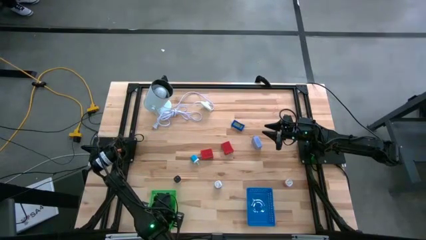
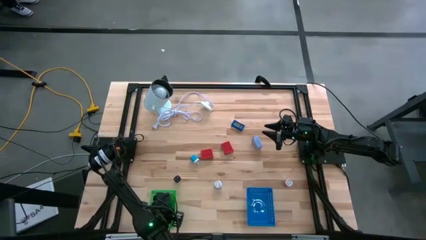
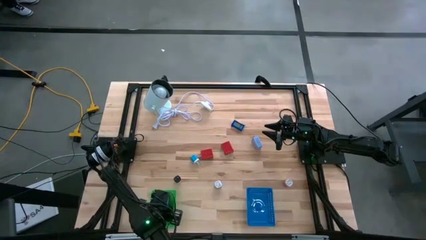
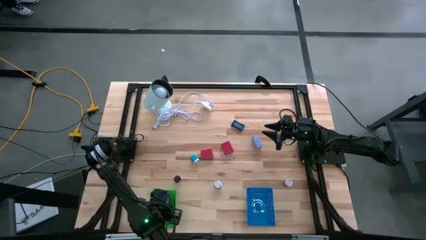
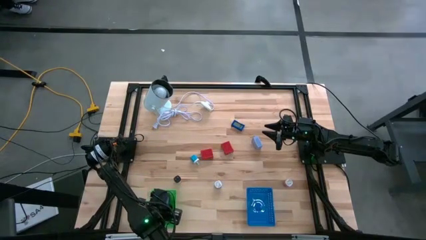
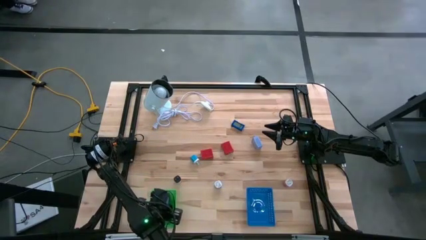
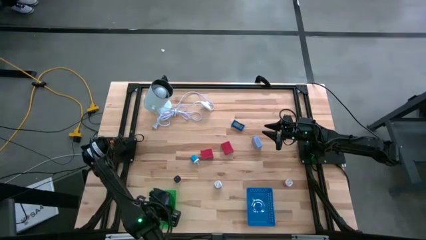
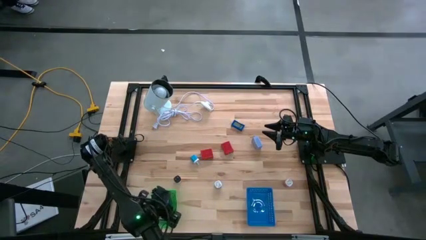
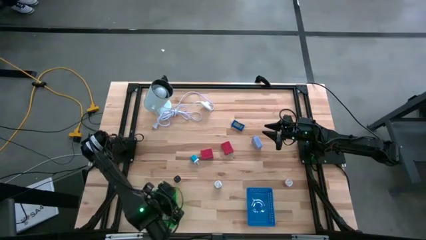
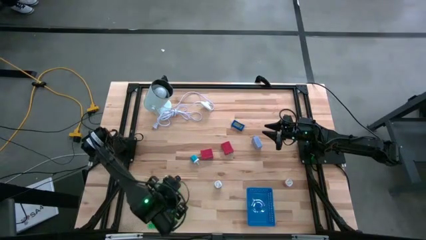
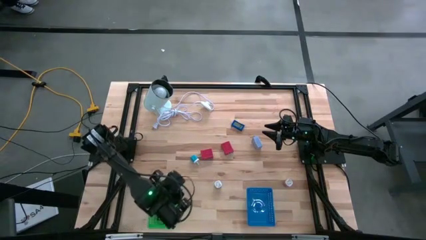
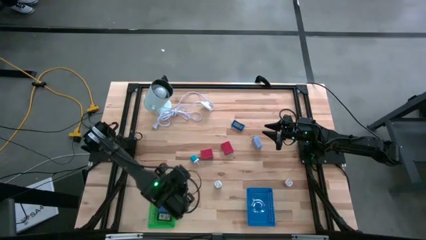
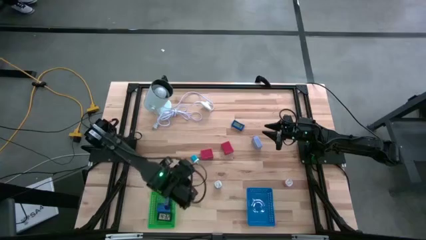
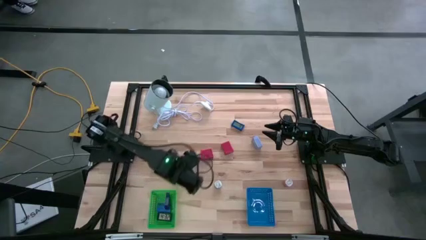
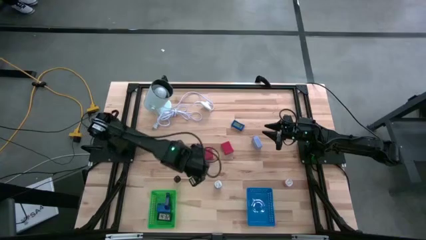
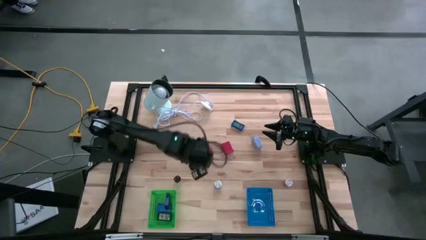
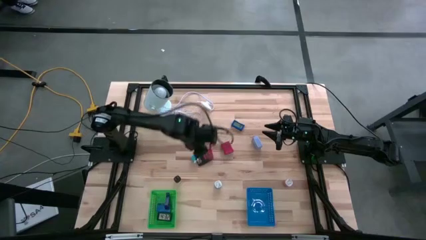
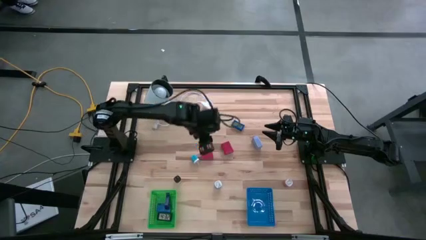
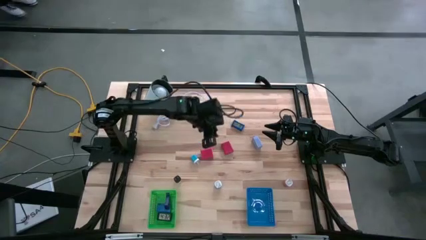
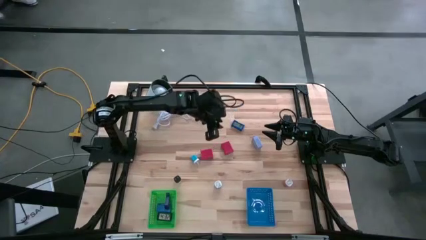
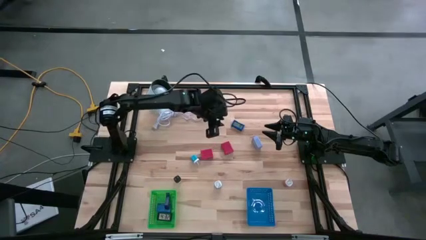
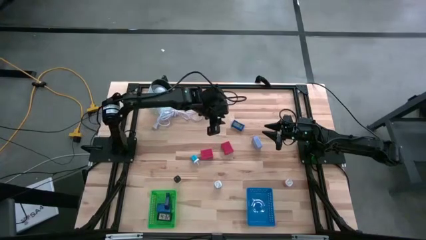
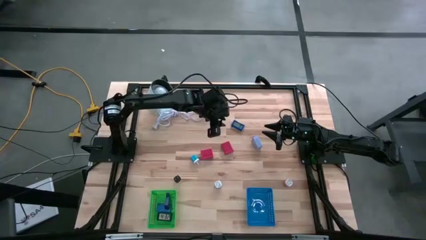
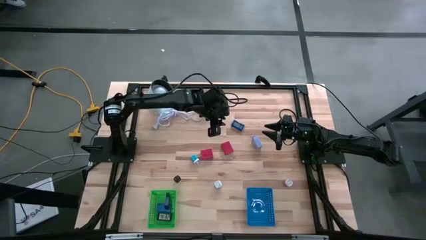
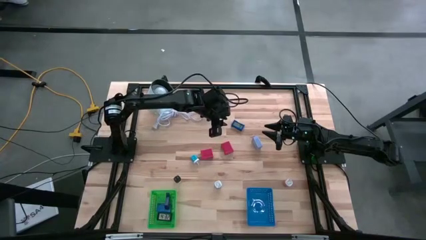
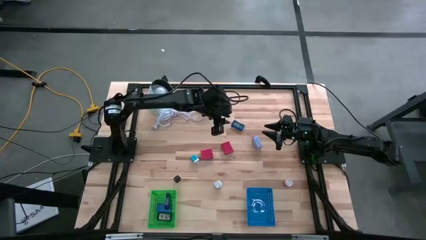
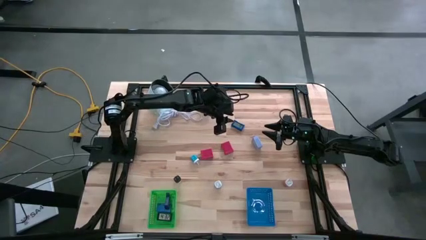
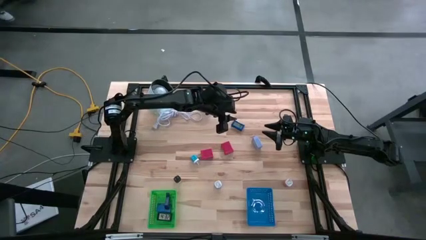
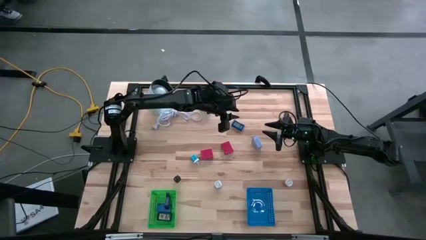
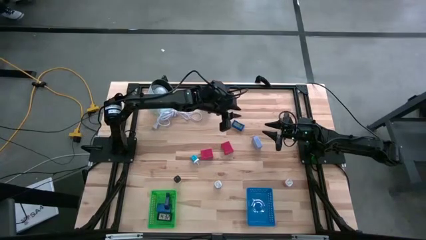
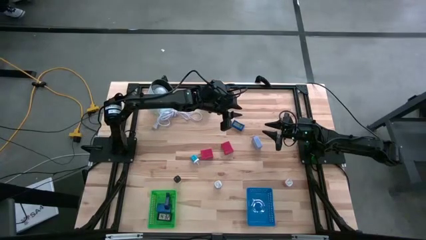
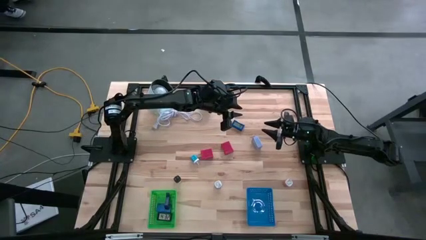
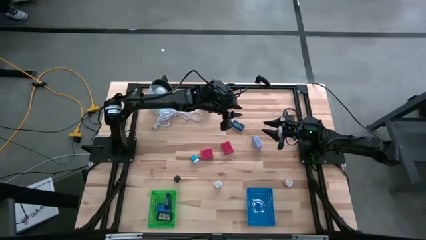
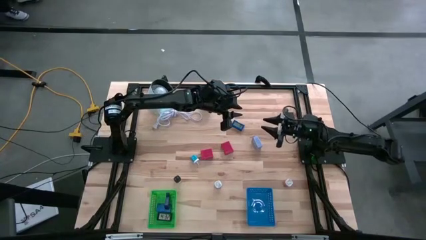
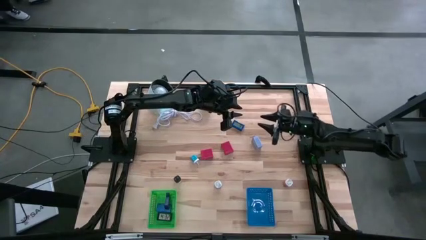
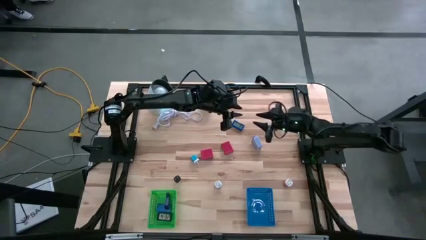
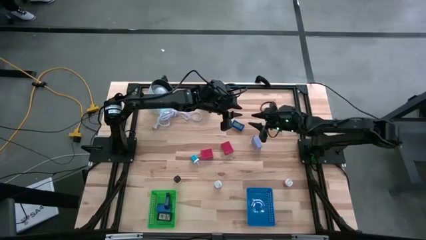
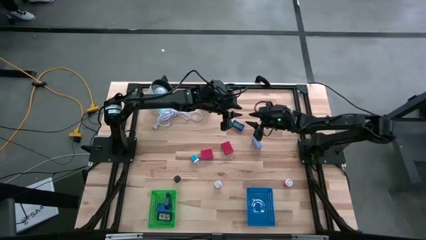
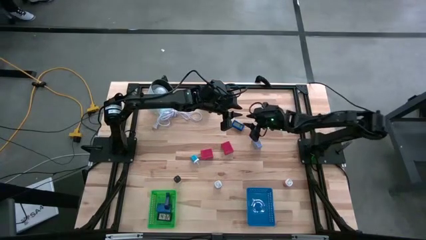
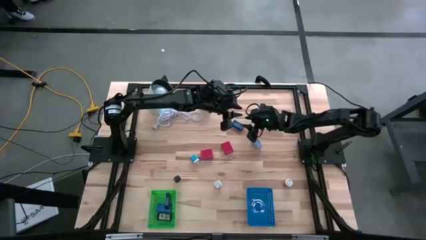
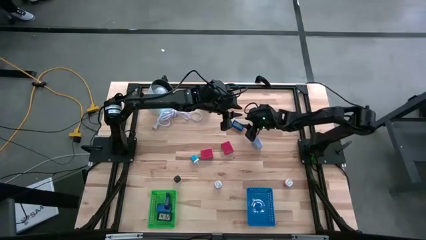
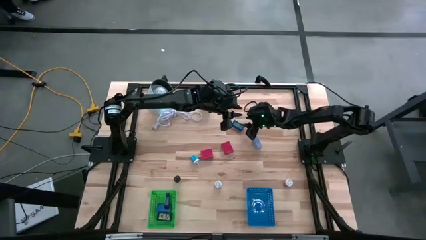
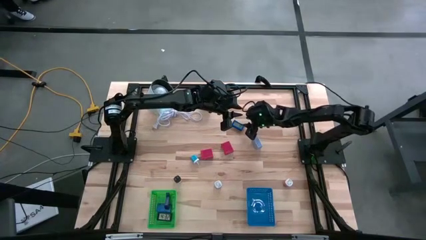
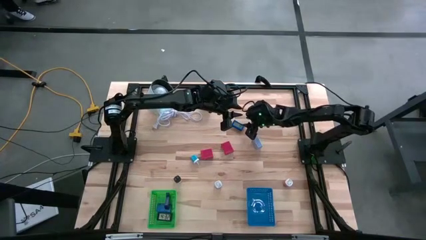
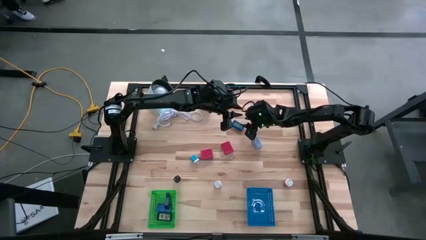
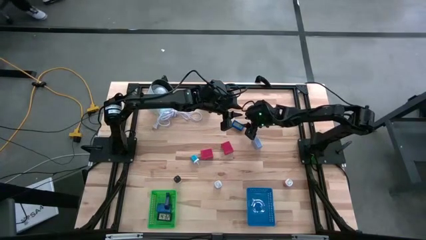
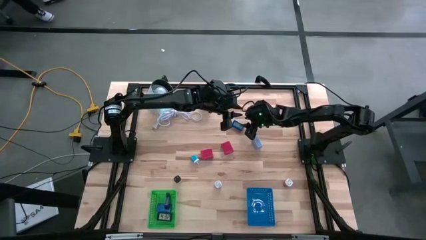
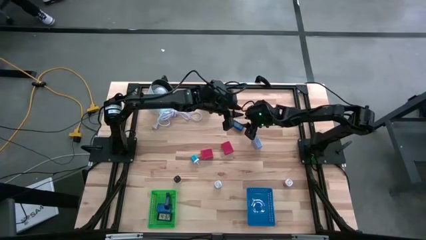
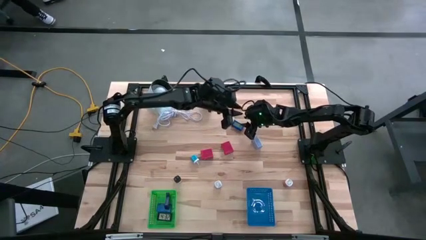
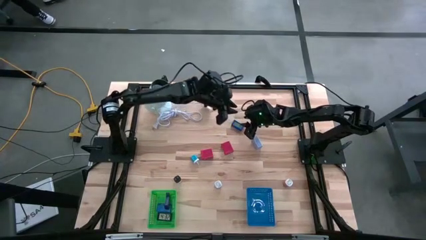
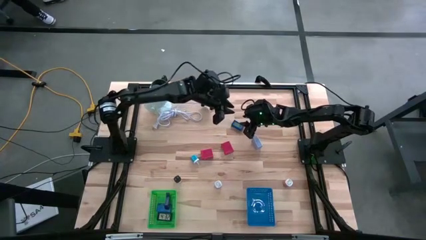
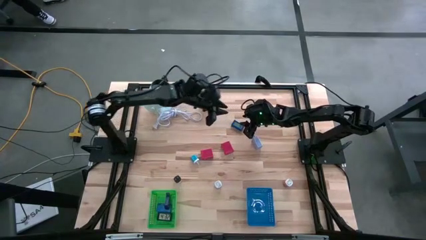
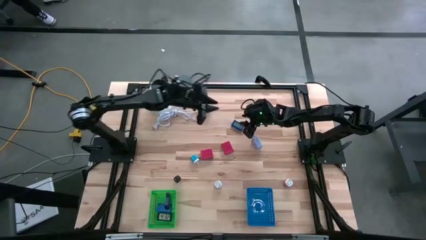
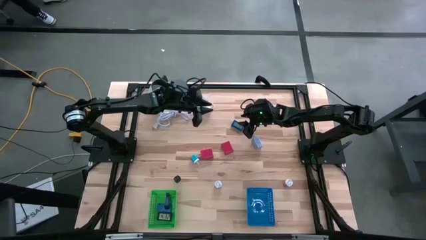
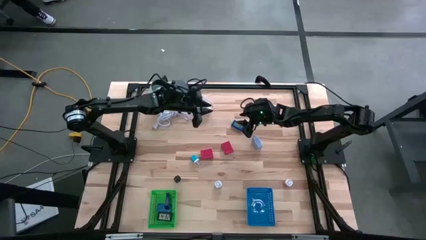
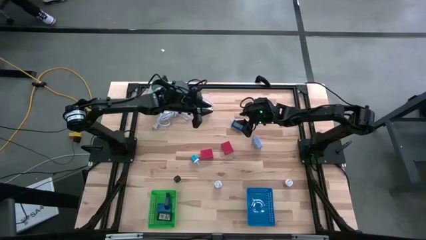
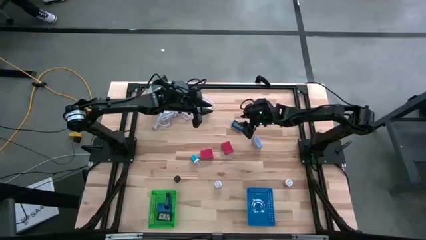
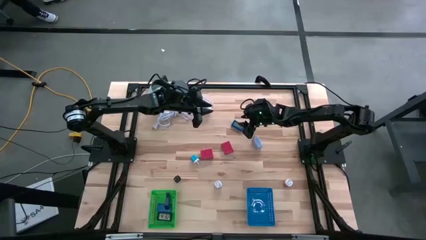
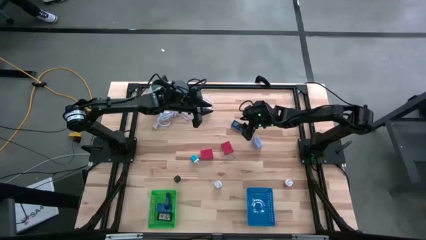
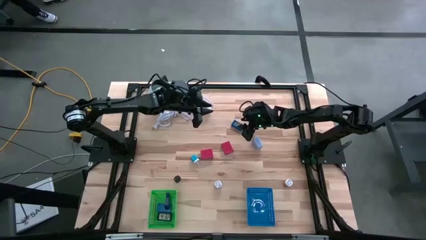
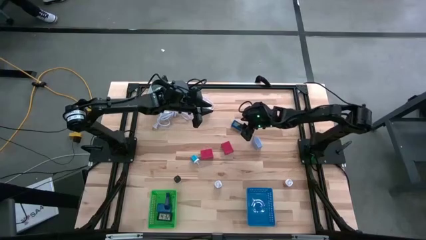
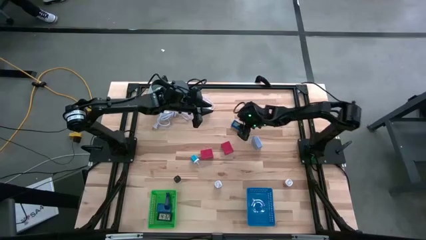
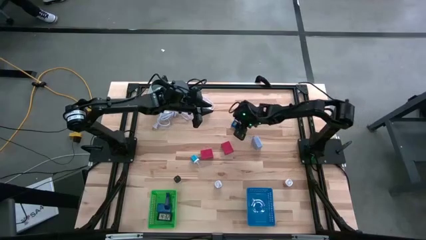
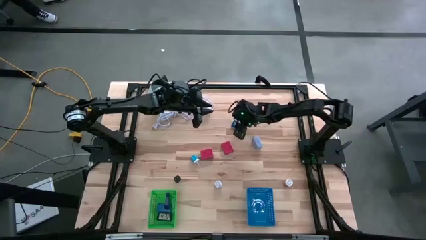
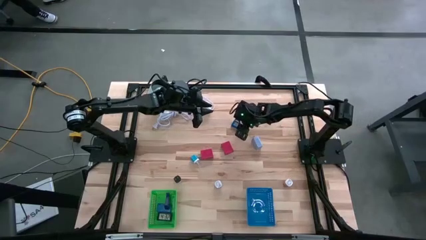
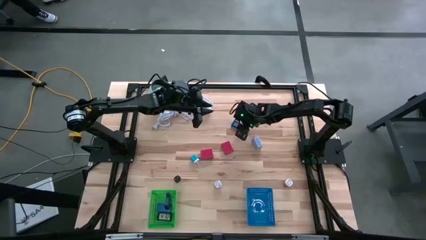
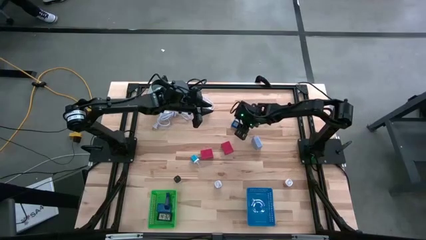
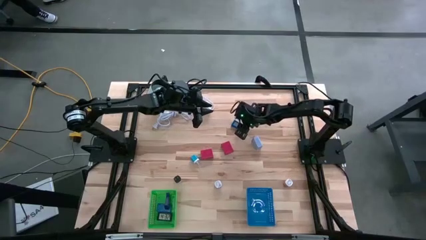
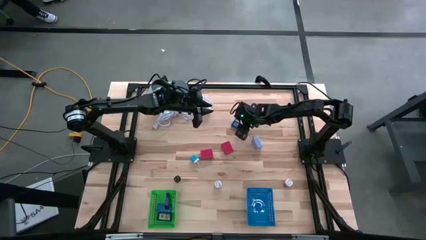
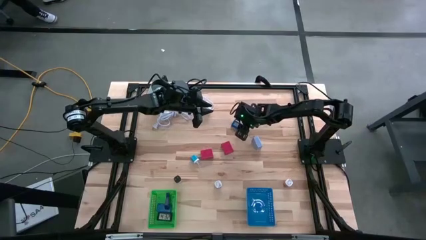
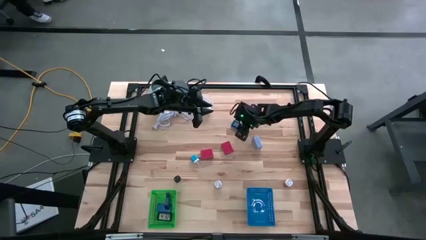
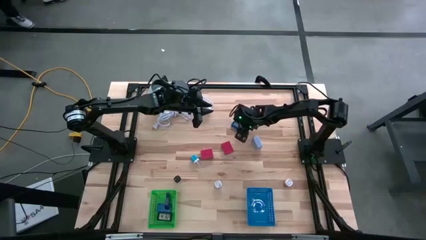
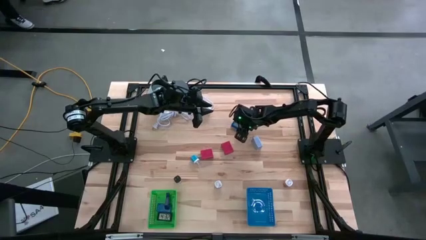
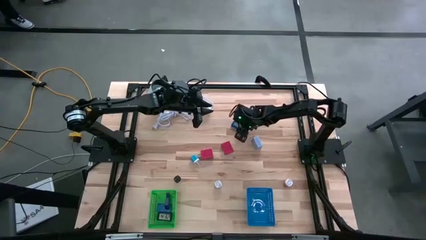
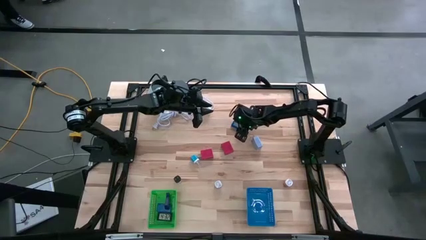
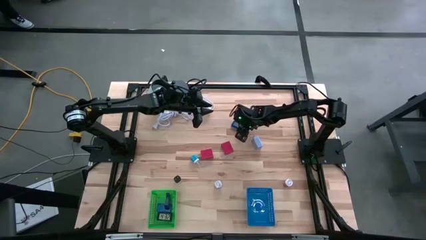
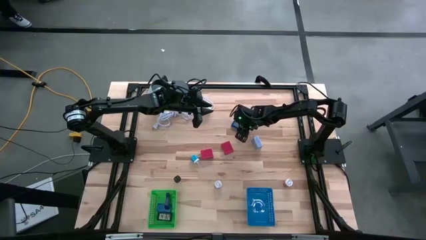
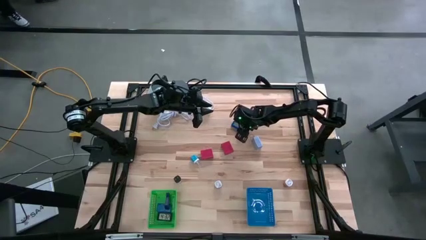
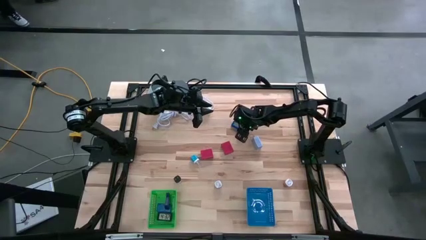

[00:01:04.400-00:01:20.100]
Task: Pick & Place Office items
Put the blue digital clock into the green bin

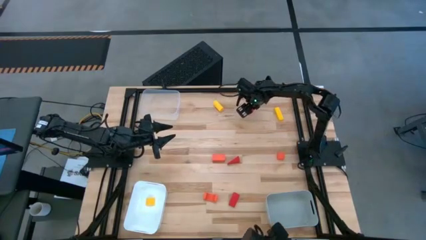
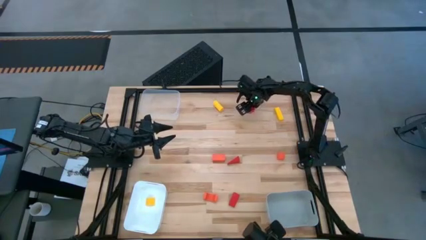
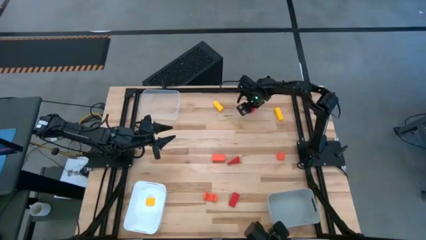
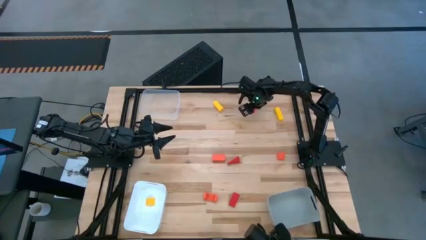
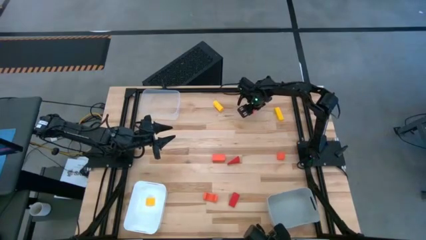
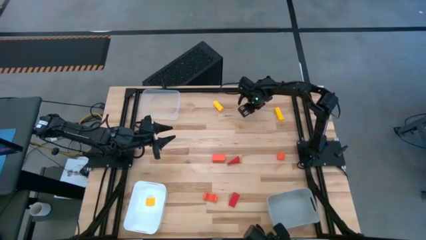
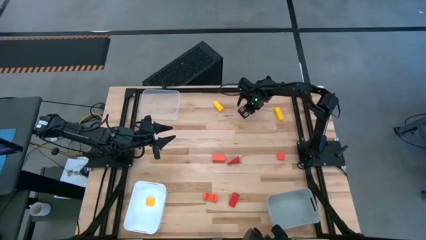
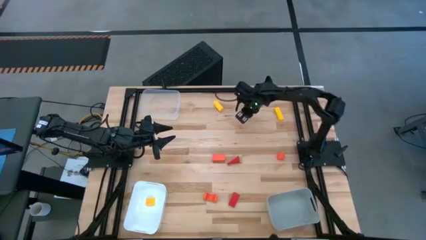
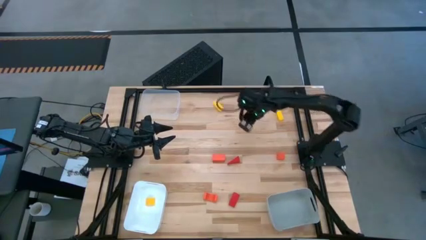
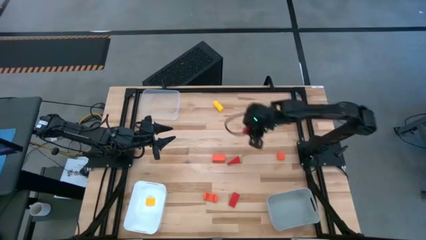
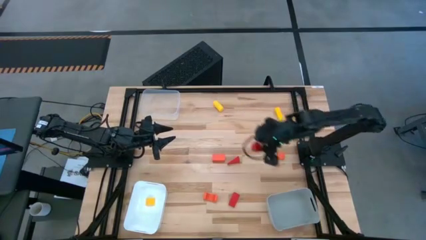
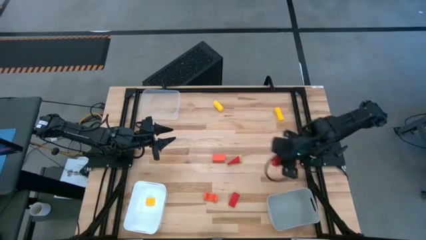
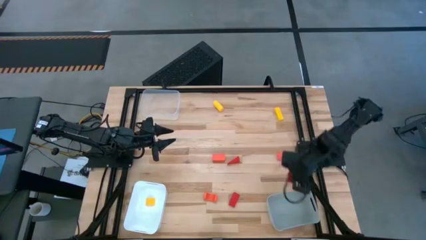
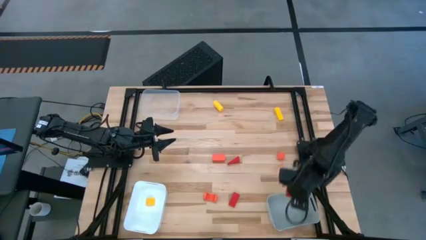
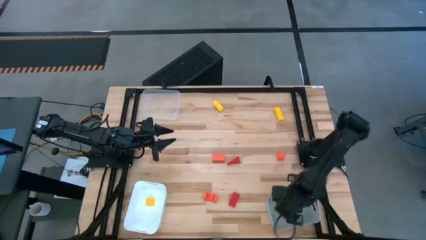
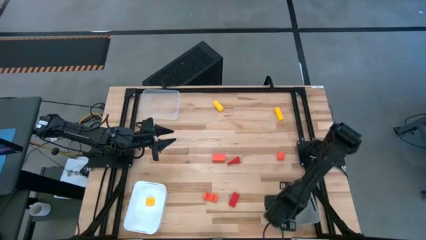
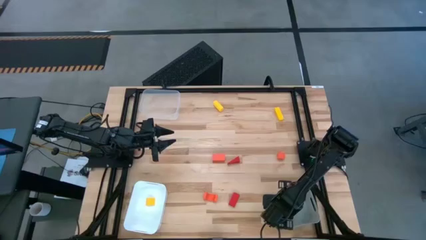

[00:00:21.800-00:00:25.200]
Task: Sort & place blocks by color
Put the top red block into the gray bin
